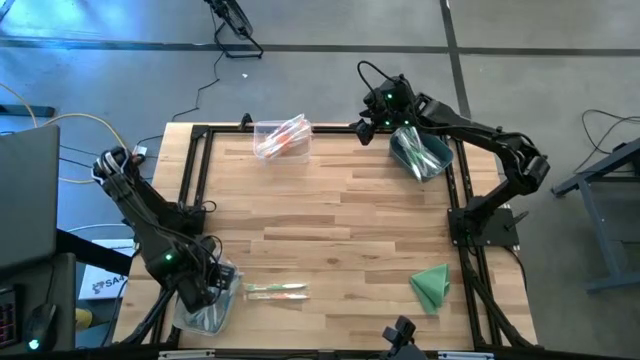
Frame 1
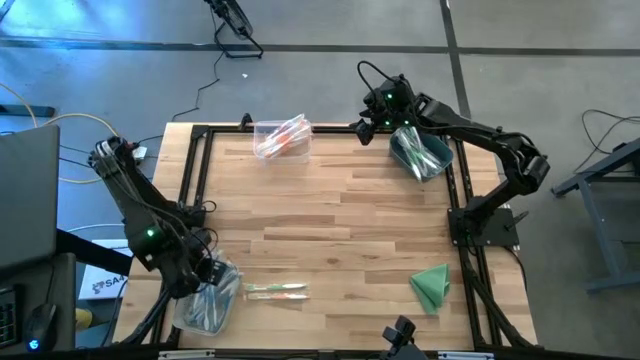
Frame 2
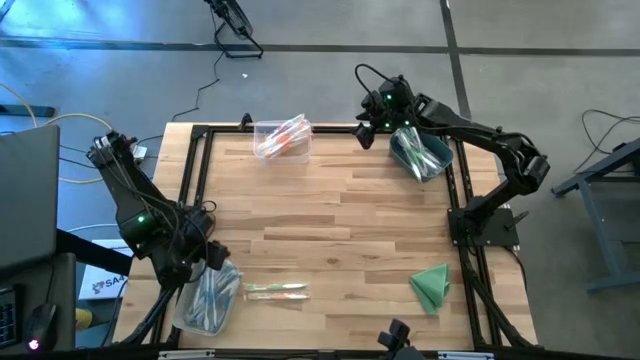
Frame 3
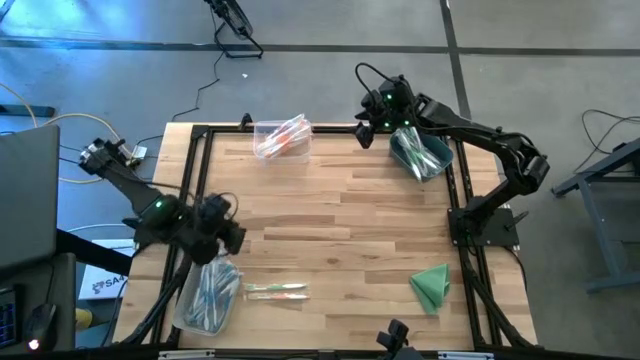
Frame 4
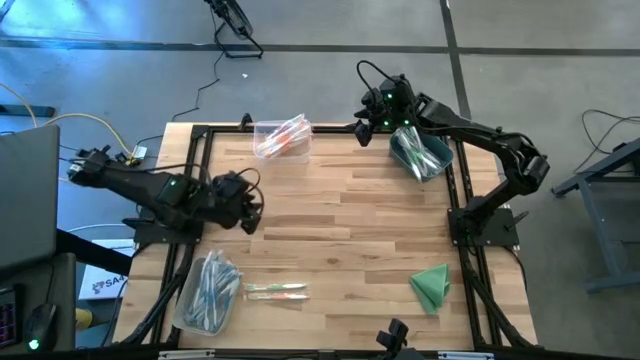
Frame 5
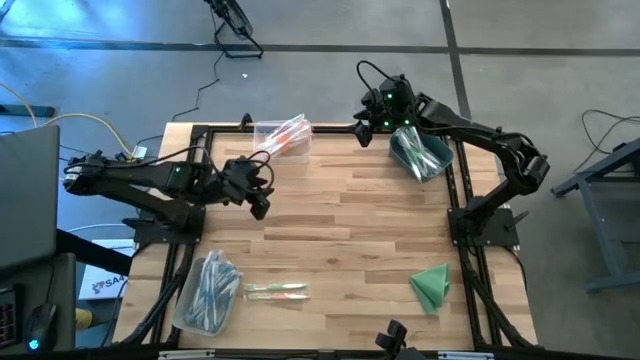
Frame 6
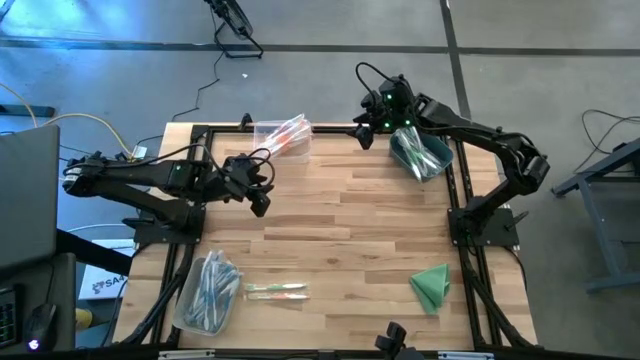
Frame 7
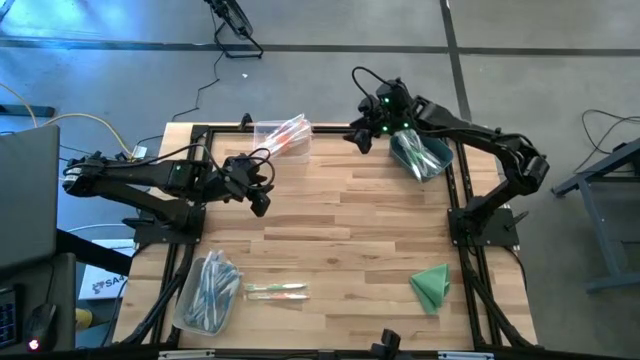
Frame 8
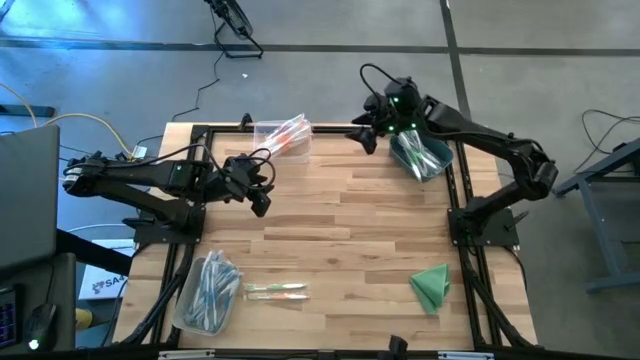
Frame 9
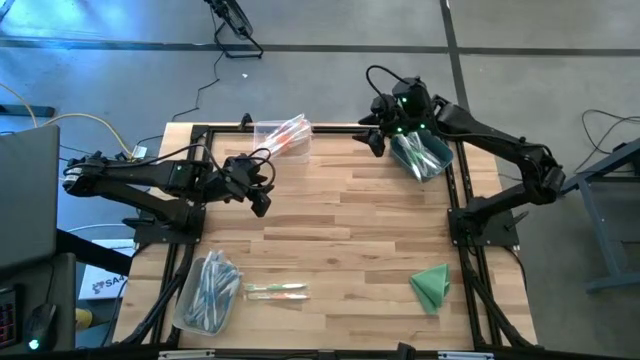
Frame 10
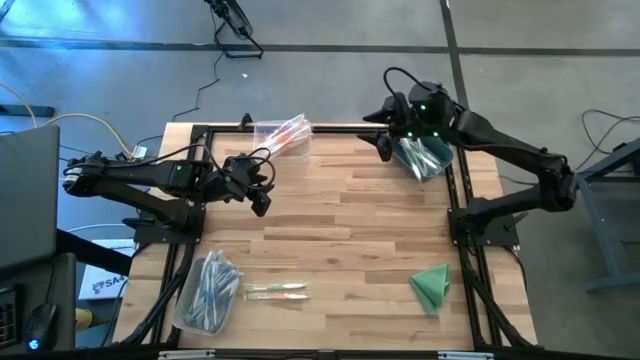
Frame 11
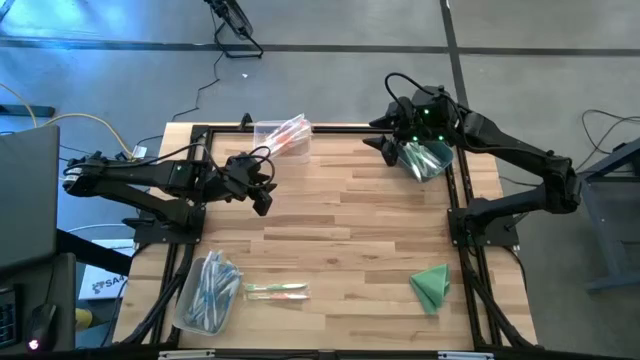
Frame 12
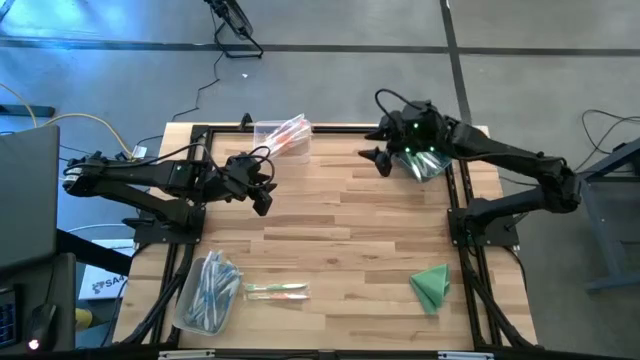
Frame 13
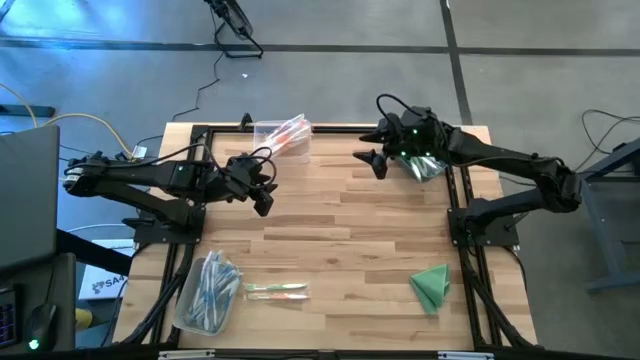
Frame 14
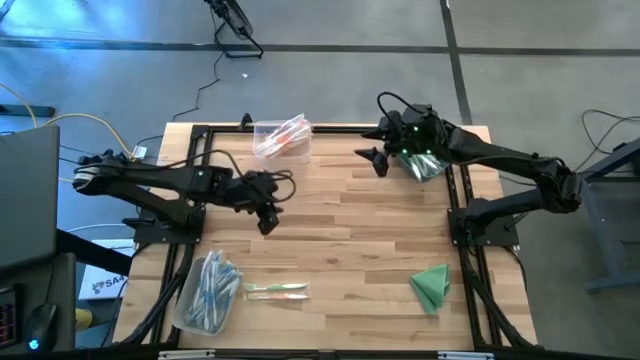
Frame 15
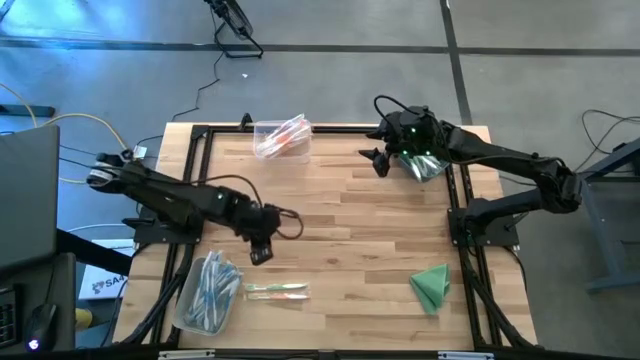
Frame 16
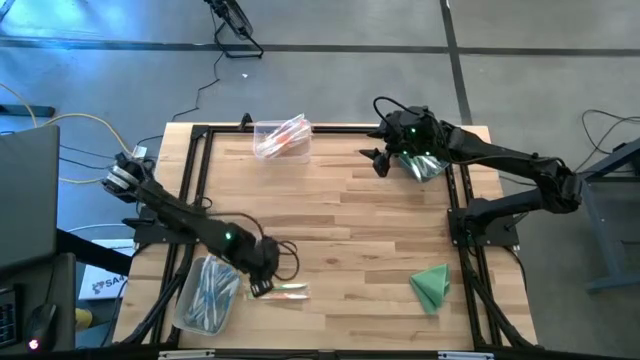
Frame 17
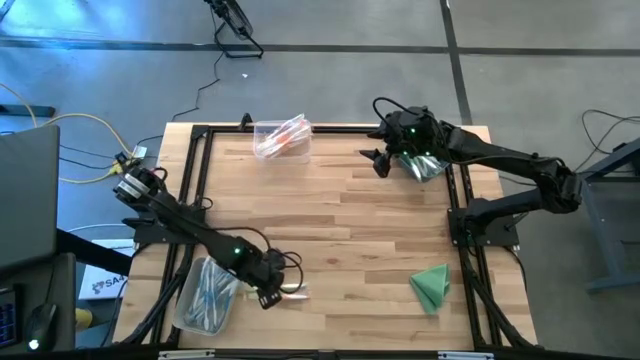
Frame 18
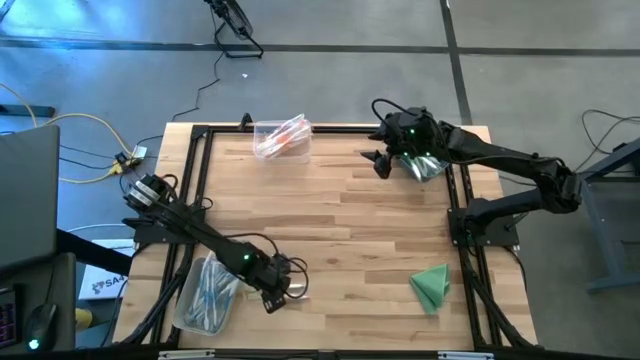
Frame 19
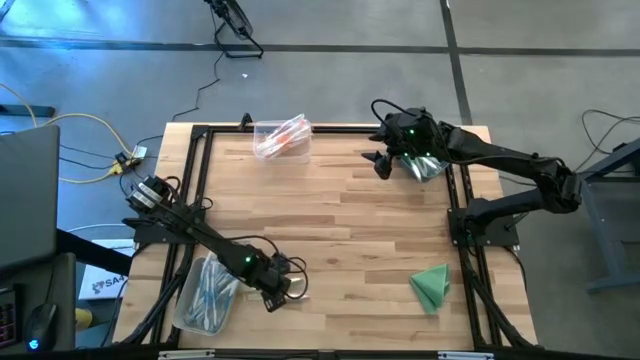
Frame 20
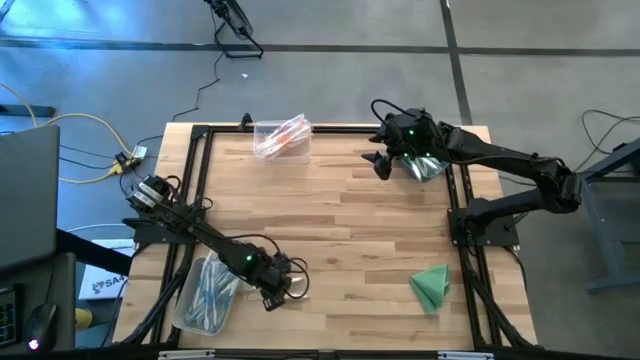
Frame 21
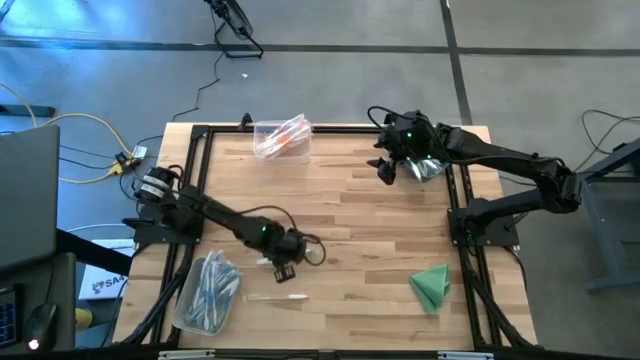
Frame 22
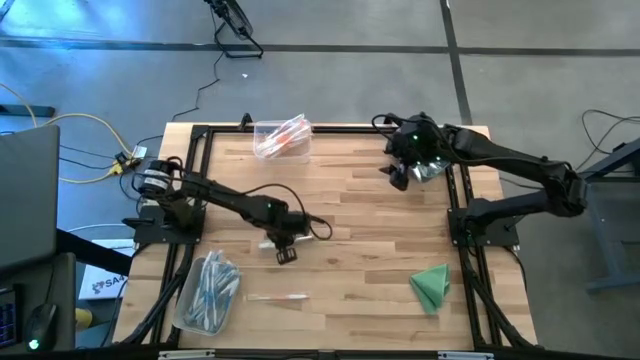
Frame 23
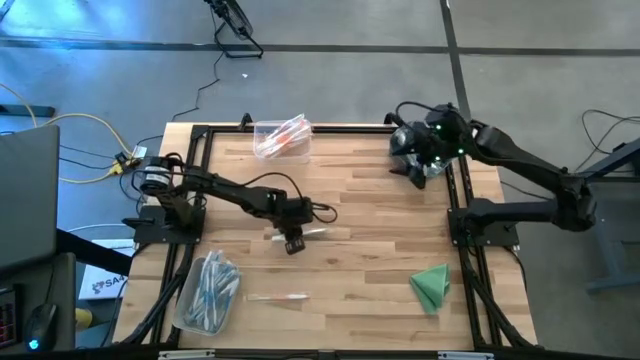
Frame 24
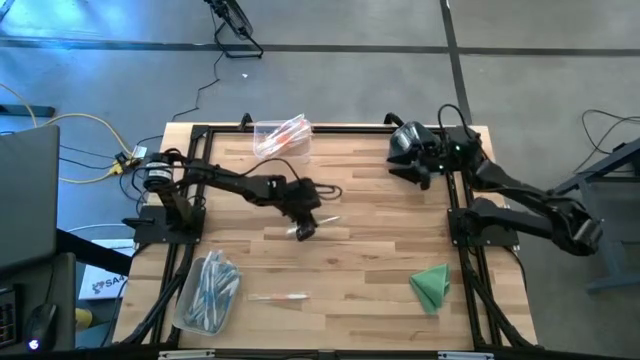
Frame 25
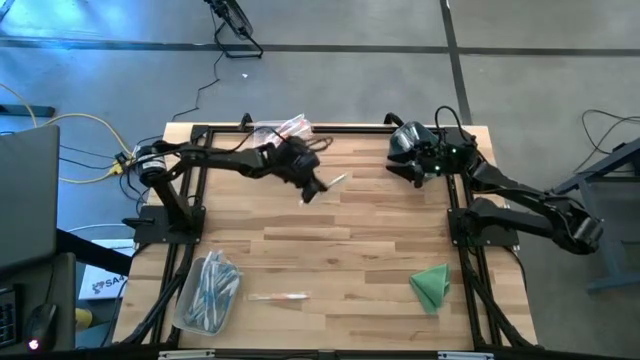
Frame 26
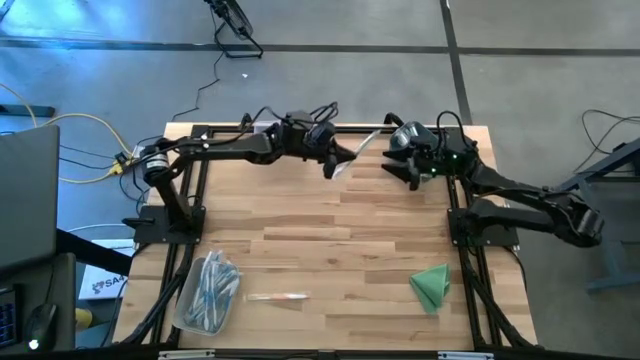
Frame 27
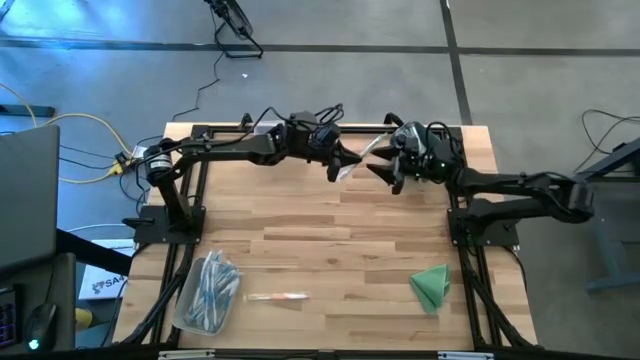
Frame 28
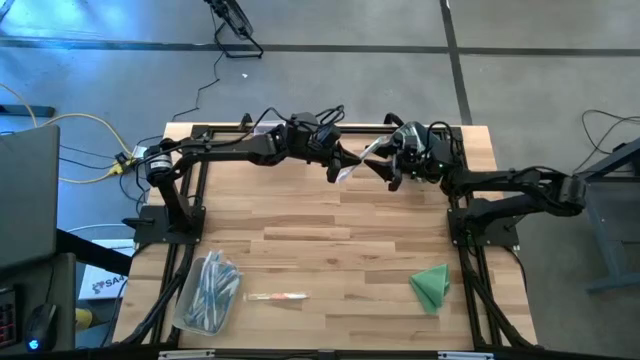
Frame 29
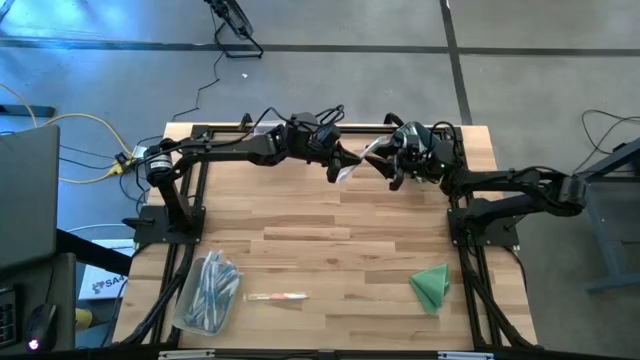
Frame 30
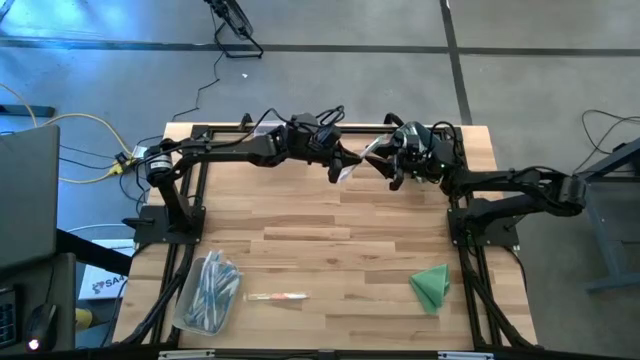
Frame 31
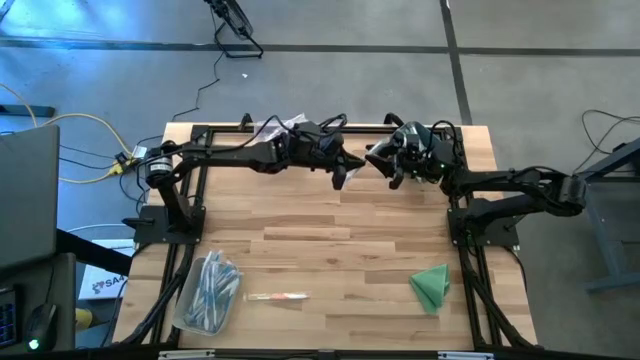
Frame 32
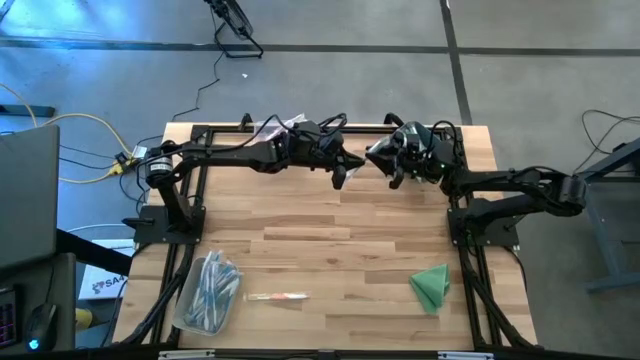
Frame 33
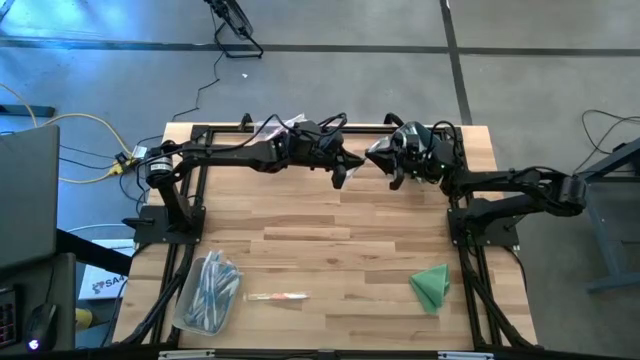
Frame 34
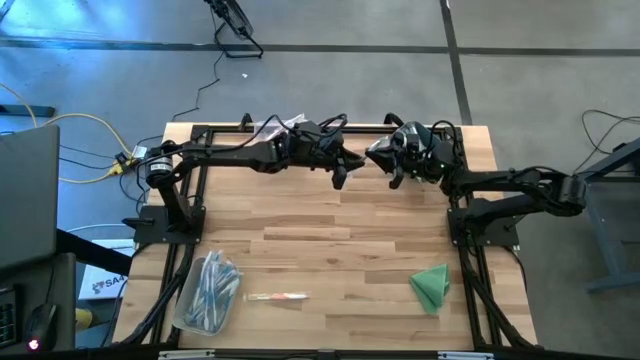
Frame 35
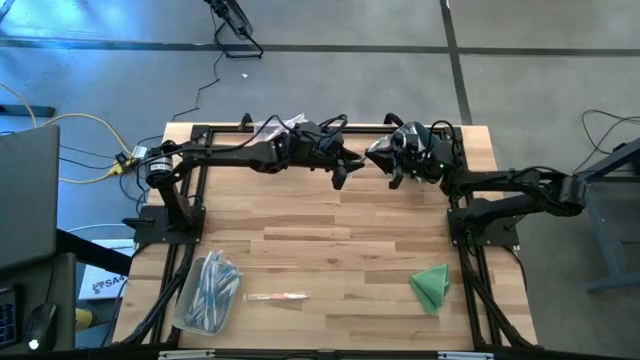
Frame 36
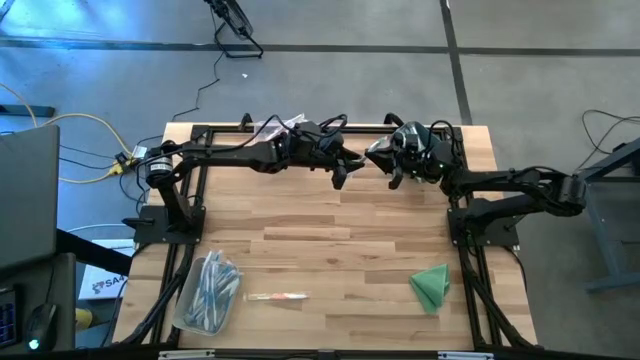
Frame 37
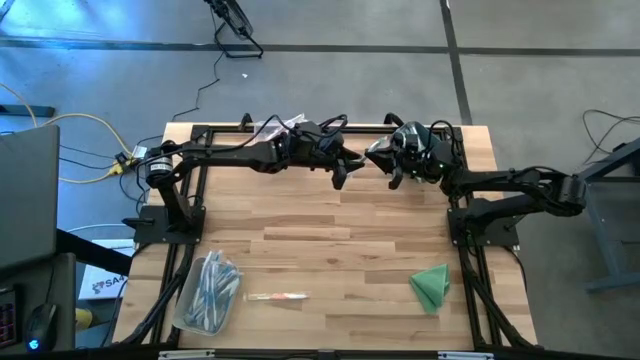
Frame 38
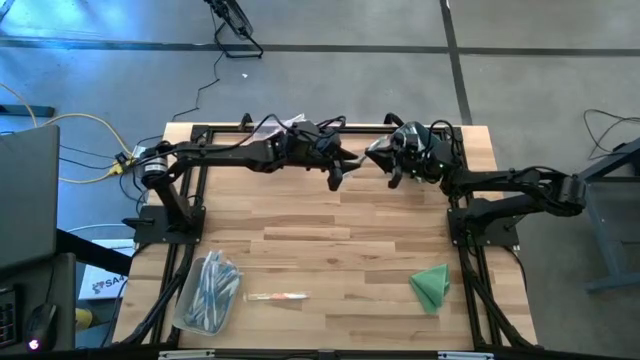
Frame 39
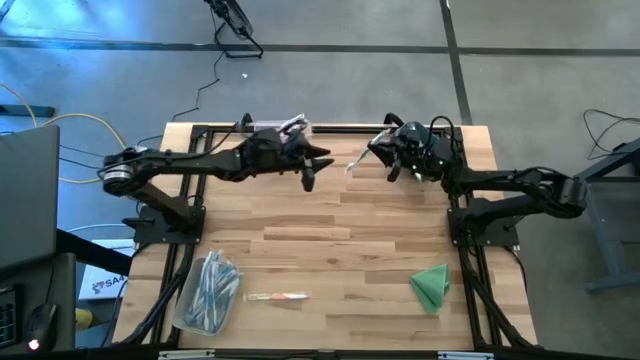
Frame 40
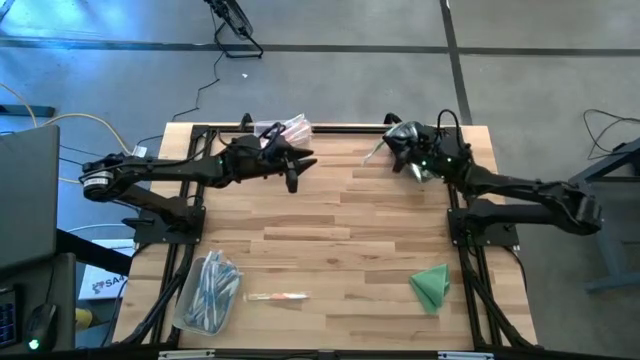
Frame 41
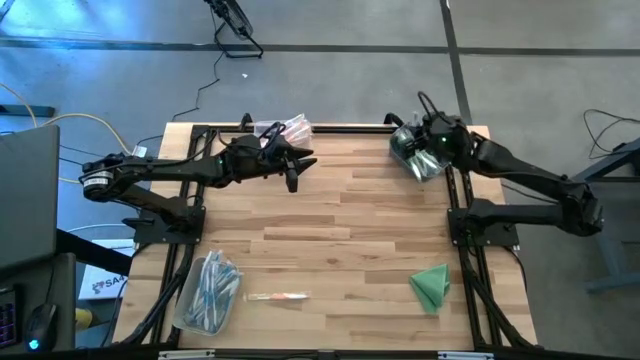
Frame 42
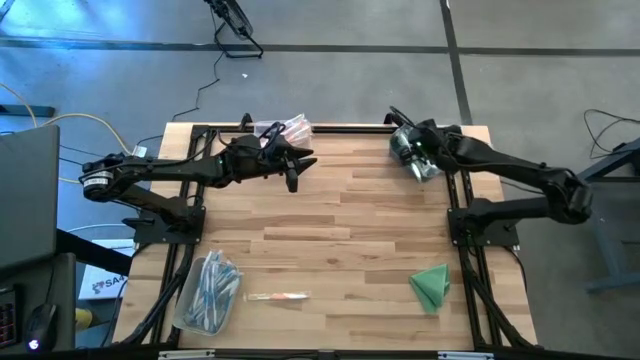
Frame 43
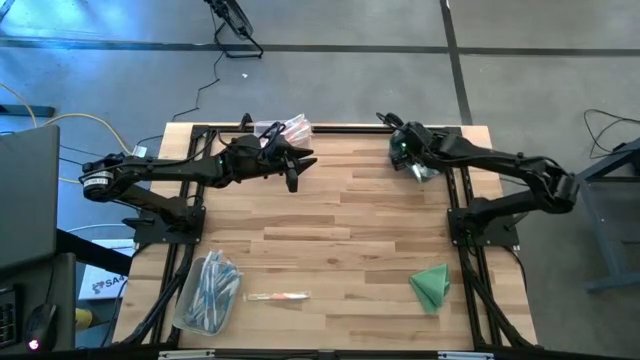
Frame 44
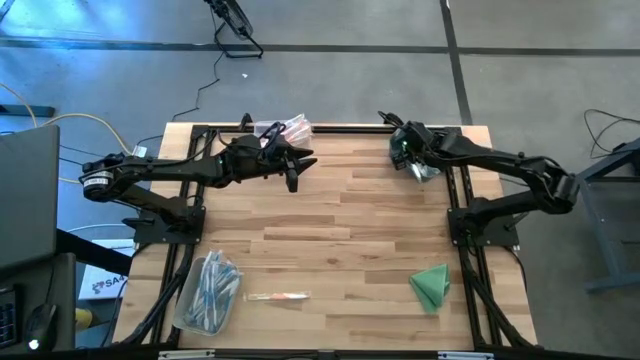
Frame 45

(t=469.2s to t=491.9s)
Task: Pick & Place Toothbrushes
Put the green toothbrush into the blue bin
